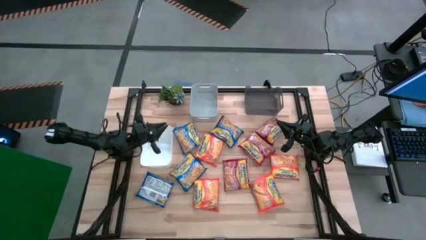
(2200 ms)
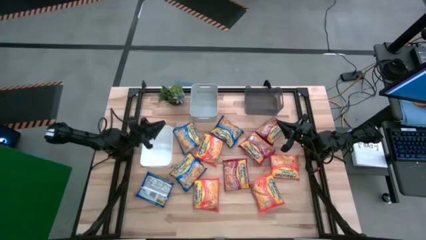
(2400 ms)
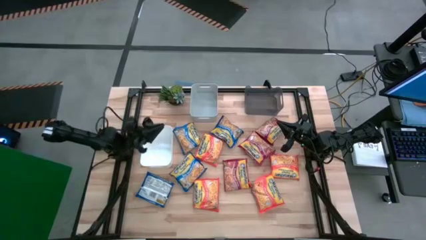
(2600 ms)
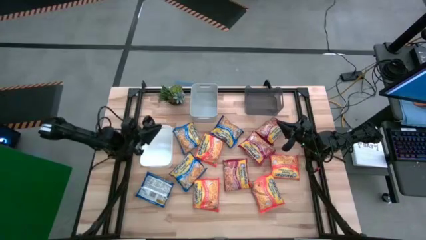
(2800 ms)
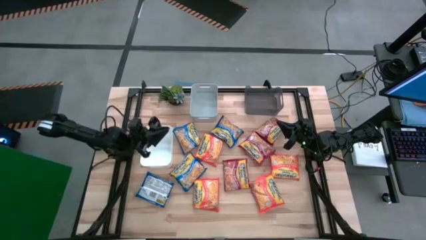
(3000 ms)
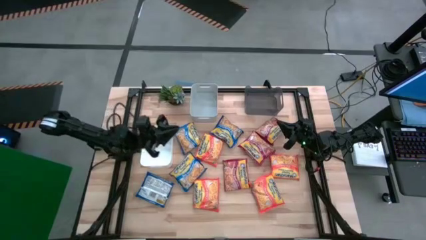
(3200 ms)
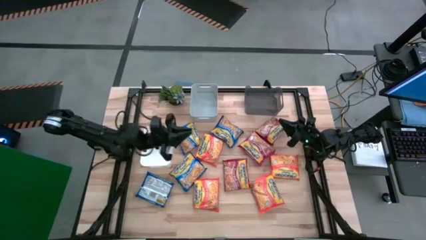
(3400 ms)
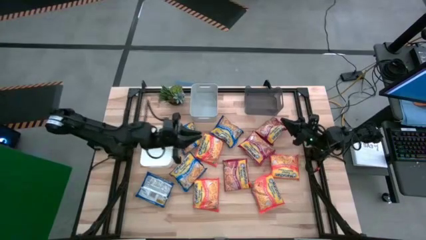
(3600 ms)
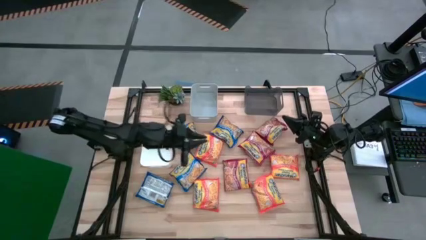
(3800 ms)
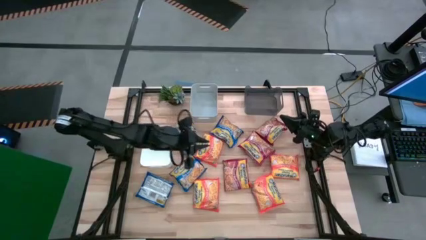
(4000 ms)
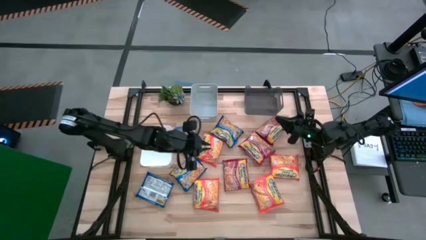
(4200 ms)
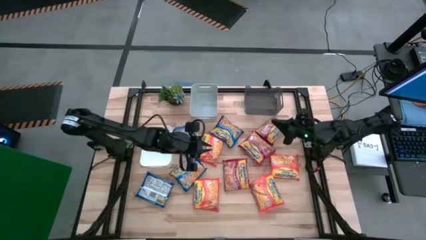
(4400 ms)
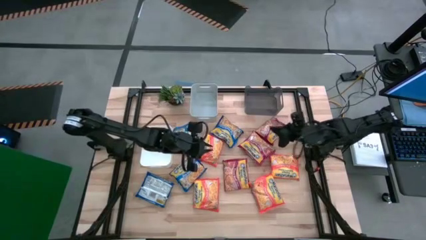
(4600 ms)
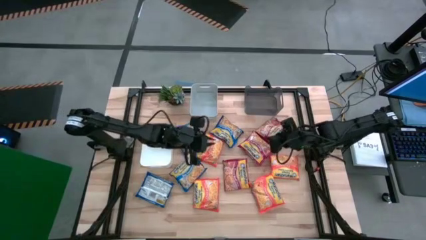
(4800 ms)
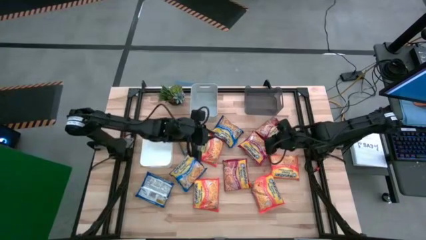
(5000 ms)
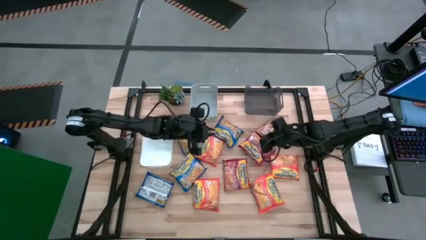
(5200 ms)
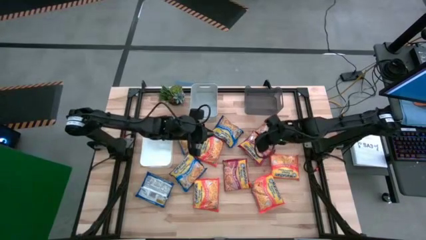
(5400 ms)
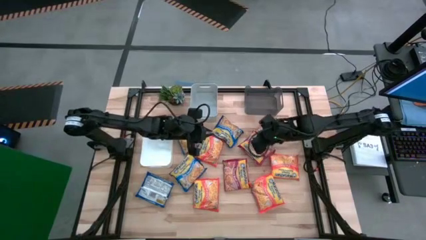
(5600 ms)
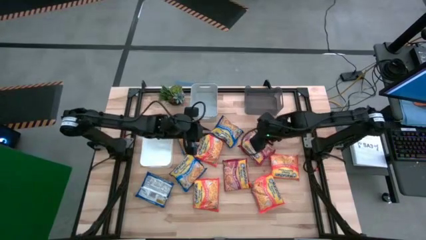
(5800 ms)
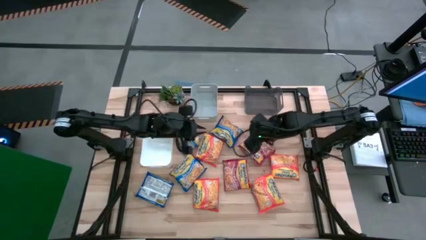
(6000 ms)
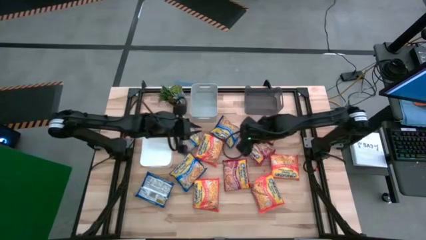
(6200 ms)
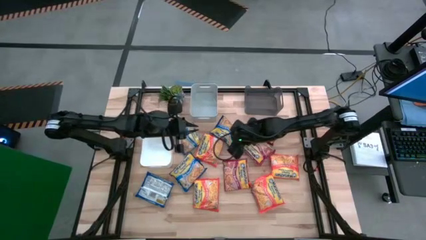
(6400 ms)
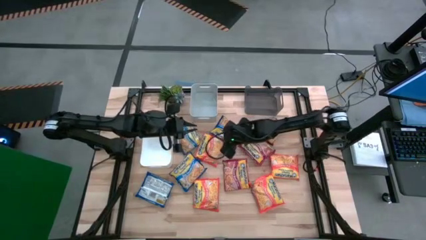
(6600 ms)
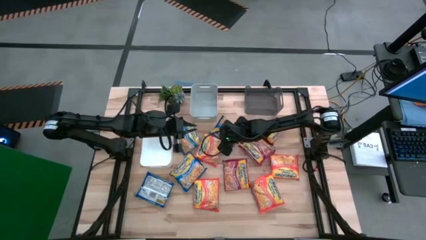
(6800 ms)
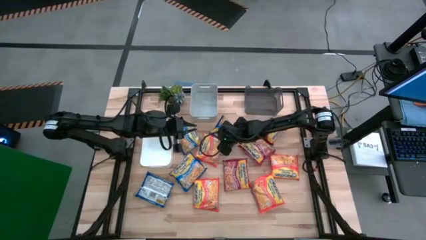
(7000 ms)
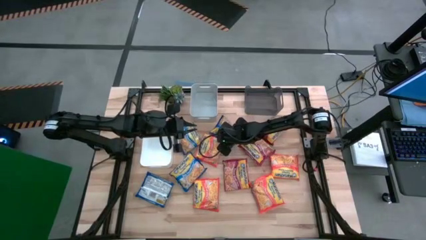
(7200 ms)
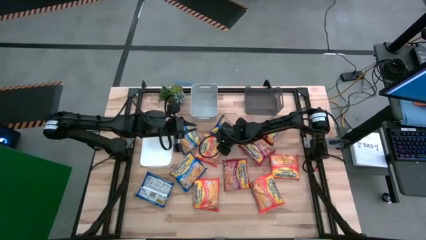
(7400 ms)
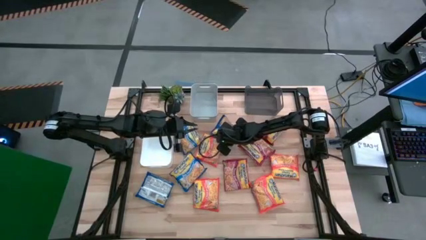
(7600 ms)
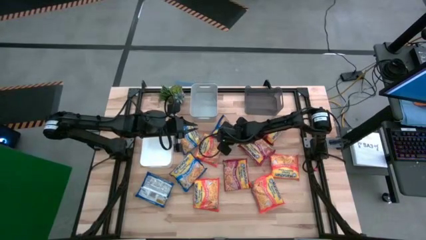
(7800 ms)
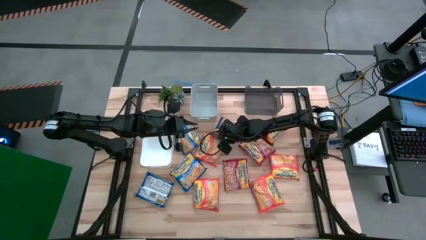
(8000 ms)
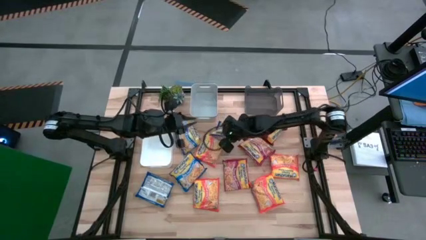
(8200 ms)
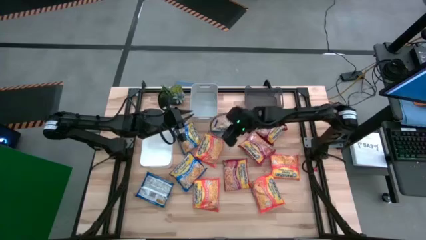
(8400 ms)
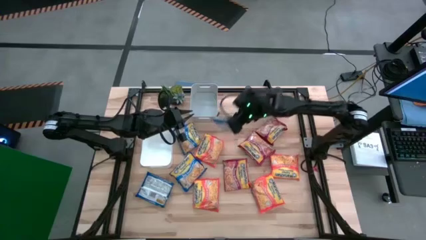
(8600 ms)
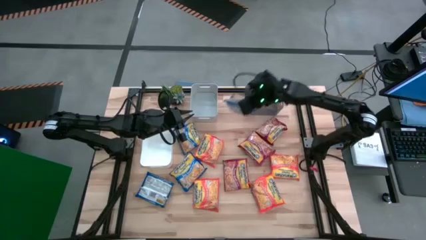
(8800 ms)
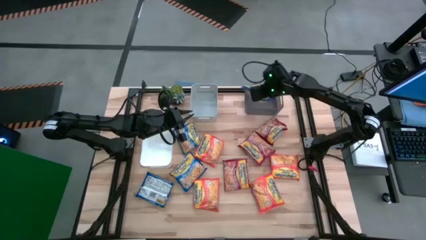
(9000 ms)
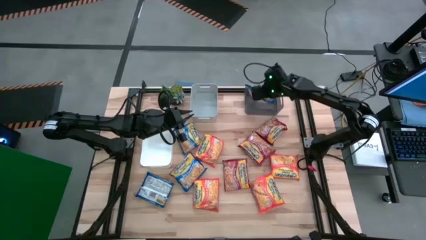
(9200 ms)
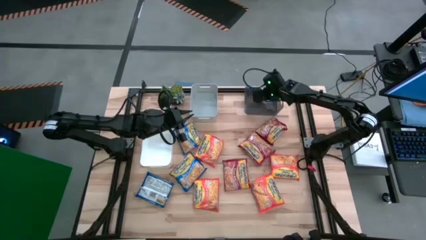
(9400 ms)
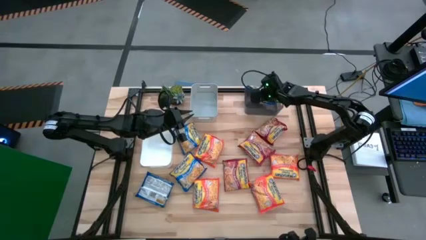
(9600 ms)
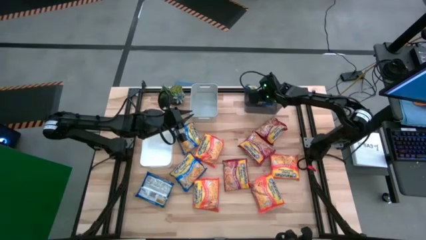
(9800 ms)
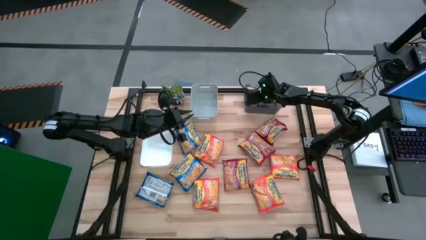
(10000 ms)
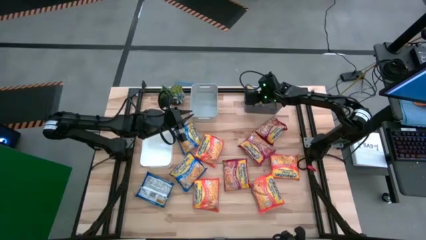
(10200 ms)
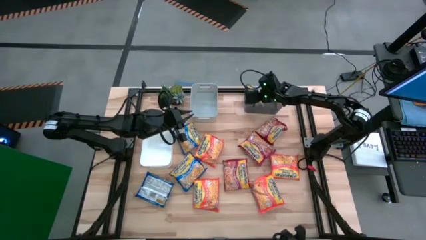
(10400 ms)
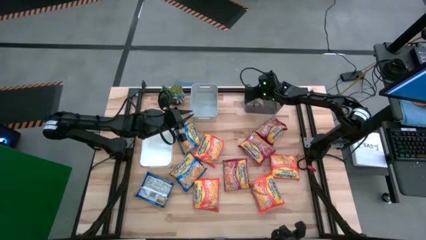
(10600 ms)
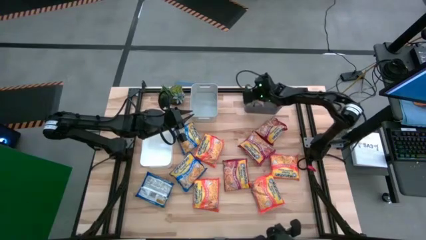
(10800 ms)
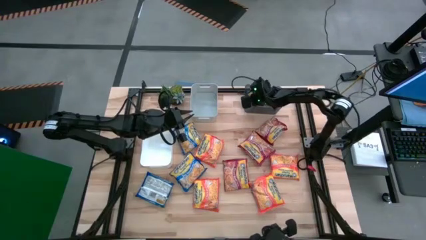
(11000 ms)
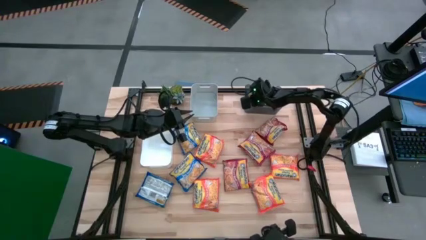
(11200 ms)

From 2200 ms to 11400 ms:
Task: Sort Maruchan noodles
Put the blue noodle pack into the black bin

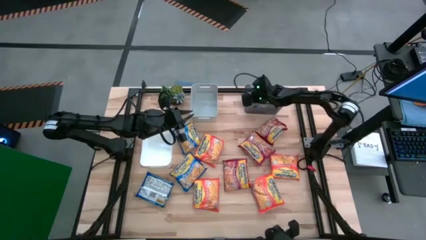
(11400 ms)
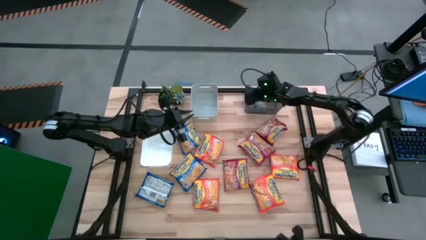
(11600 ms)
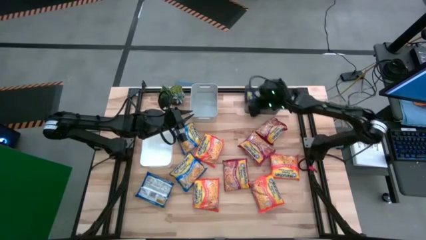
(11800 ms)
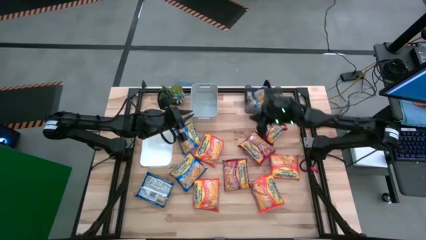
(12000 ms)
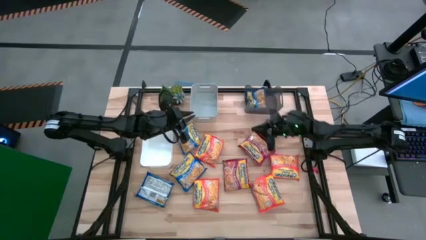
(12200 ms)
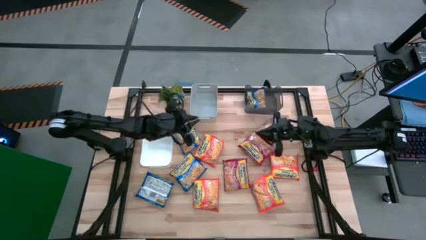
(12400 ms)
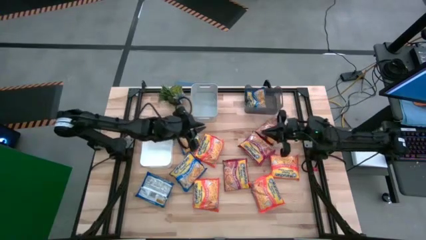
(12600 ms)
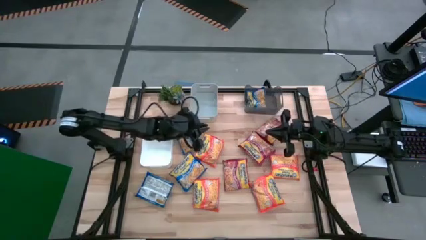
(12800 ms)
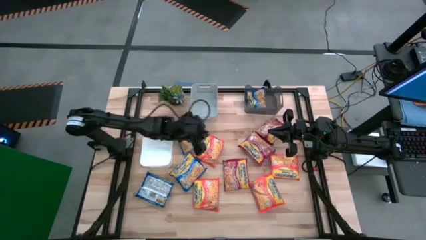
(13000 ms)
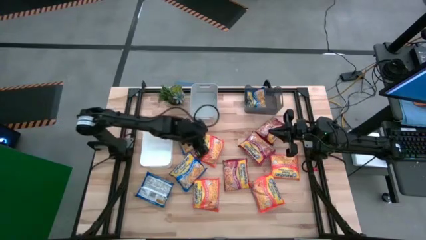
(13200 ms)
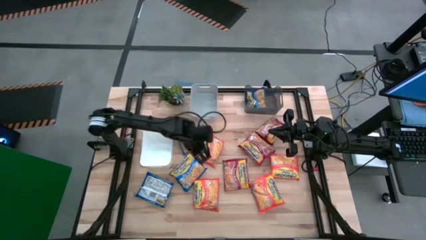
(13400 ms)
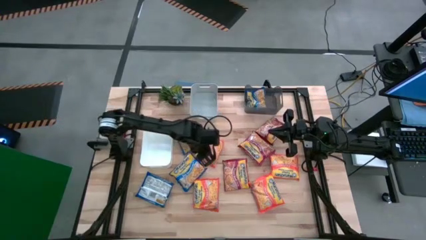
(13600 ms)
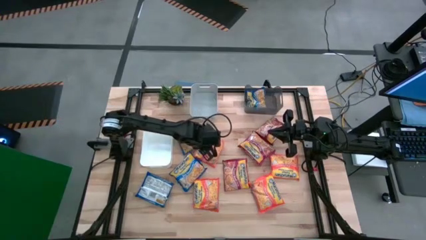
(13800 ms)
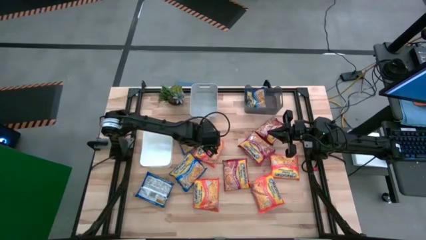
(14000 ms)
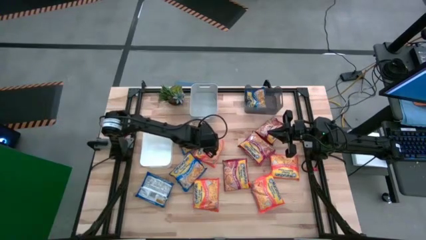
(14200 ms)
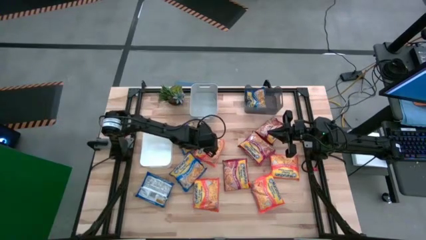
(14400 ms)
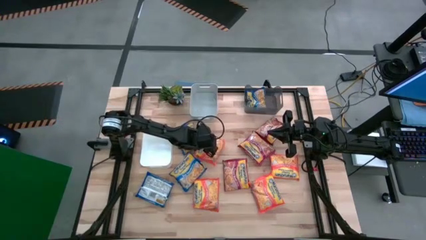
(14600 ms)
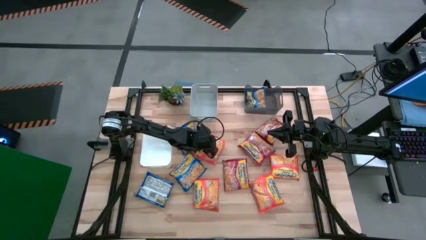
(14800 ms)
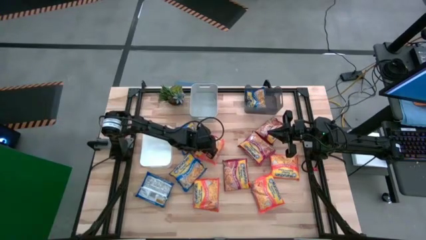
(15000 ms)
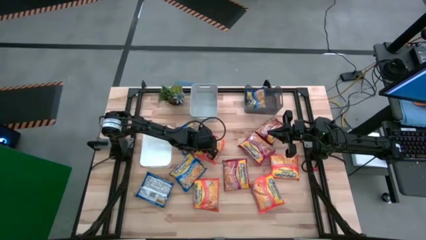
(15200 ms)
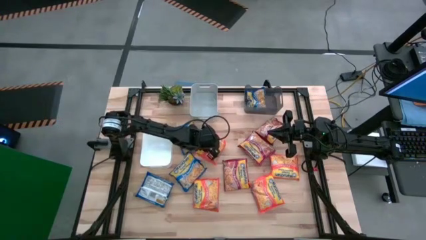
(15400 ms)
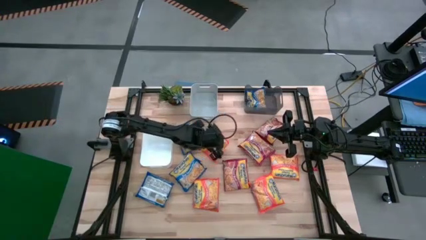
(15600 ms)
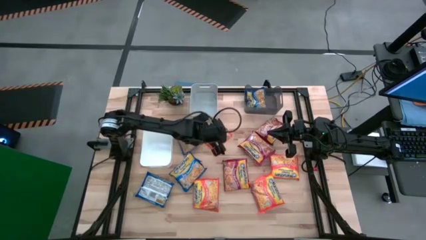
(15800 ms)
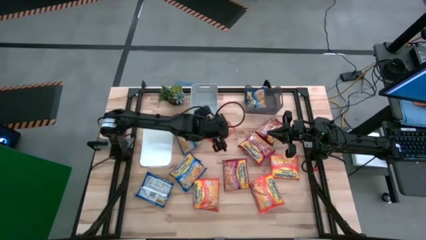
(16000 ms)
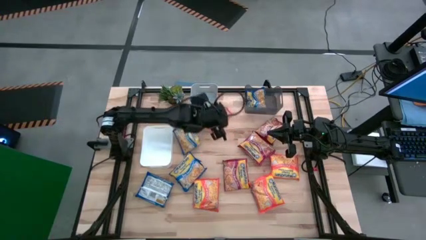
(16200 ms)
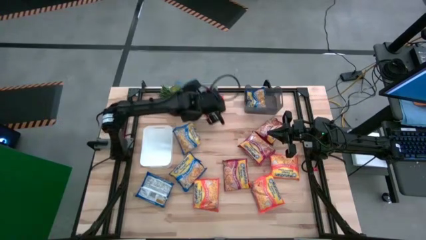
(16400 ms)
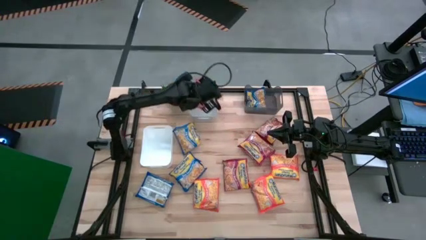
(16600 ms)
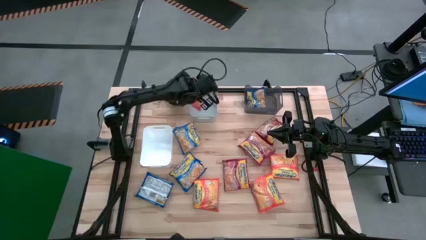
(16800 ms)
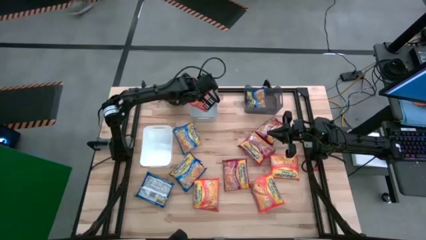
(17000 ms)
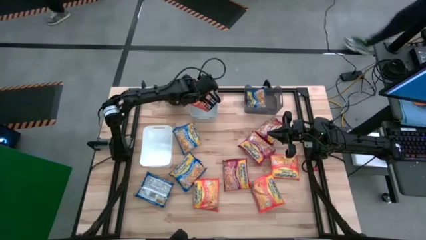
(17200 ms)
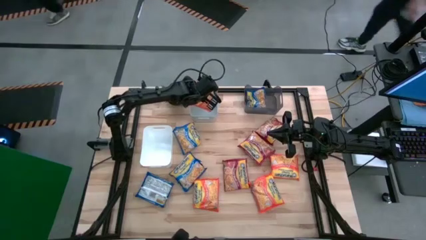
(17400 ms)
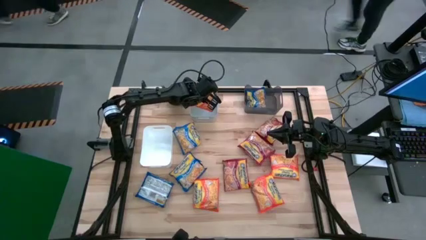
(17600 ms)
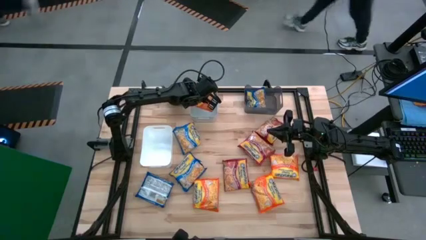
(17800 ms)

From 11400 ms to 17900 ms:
Put the orange noodle pack into the gray bin
